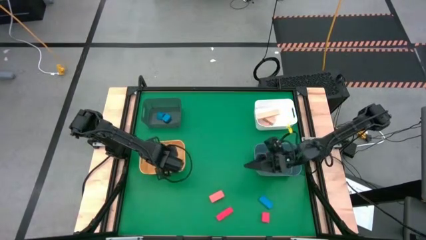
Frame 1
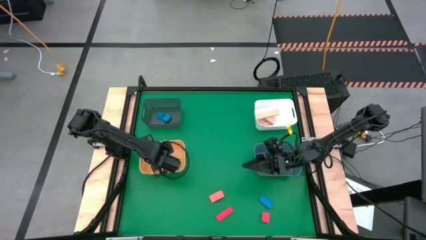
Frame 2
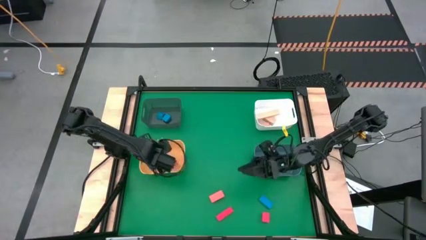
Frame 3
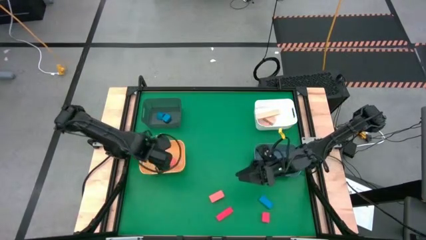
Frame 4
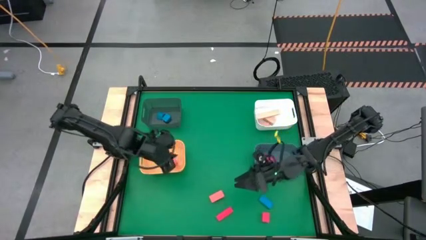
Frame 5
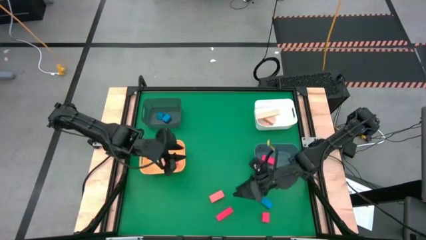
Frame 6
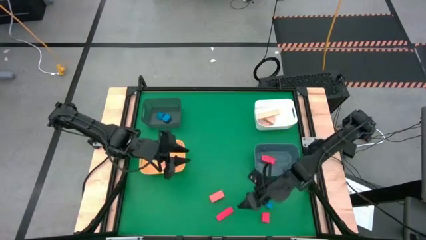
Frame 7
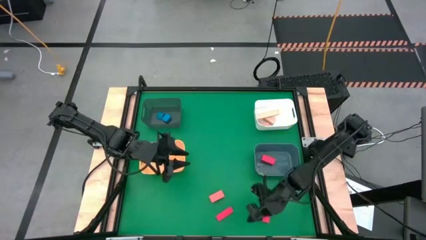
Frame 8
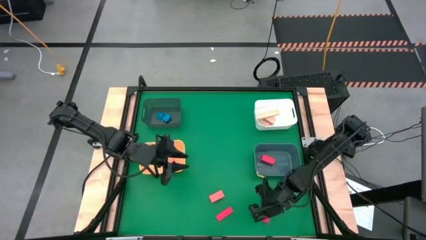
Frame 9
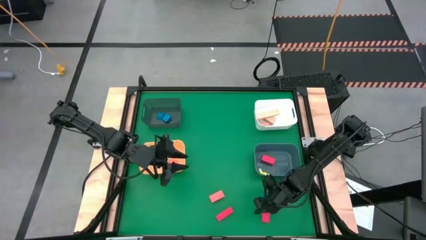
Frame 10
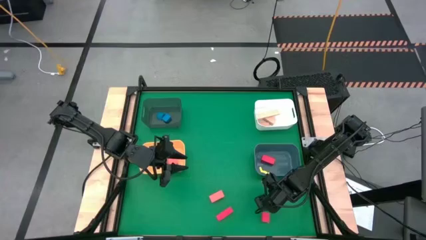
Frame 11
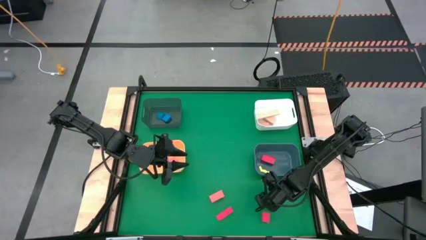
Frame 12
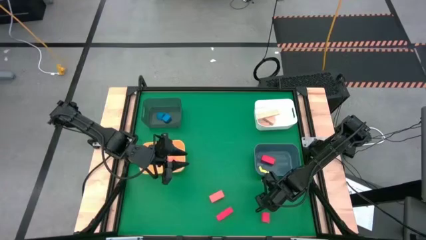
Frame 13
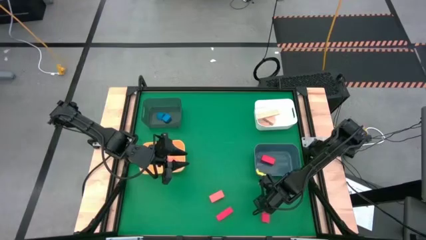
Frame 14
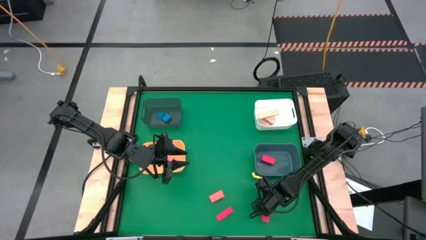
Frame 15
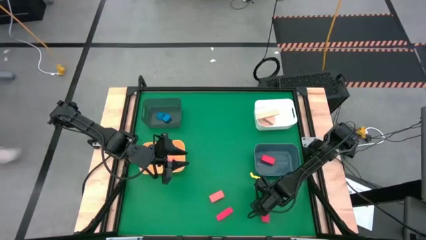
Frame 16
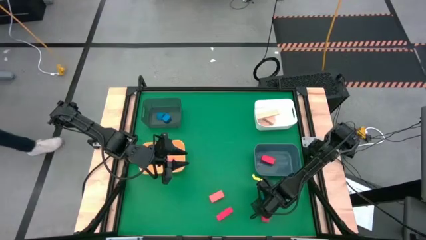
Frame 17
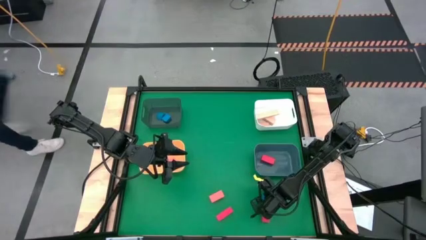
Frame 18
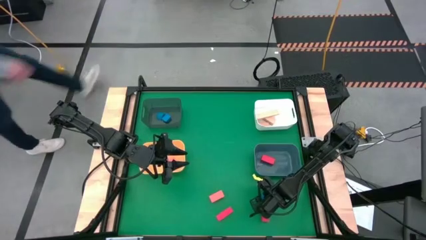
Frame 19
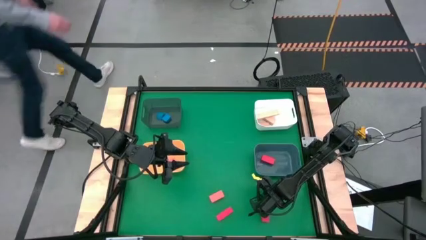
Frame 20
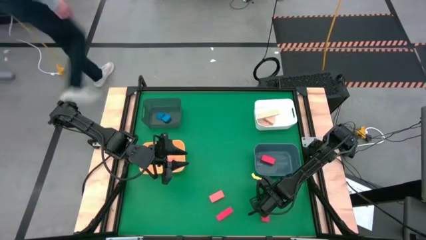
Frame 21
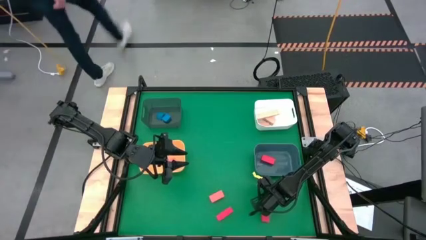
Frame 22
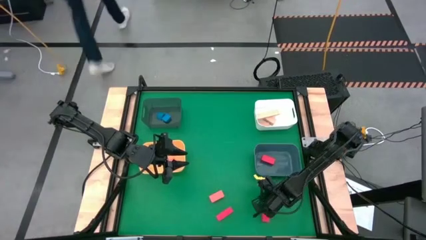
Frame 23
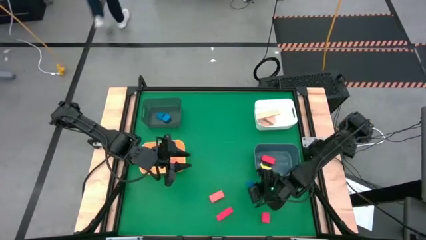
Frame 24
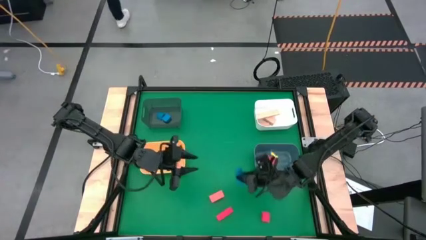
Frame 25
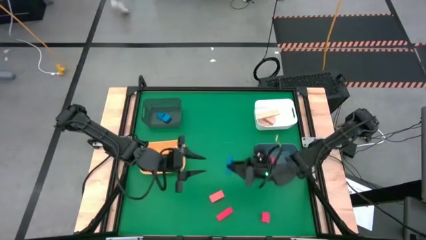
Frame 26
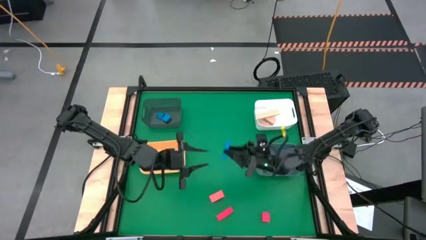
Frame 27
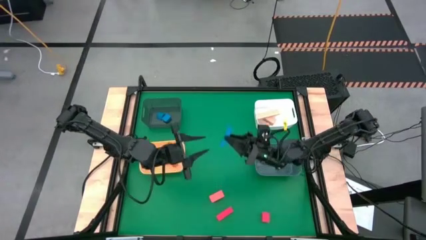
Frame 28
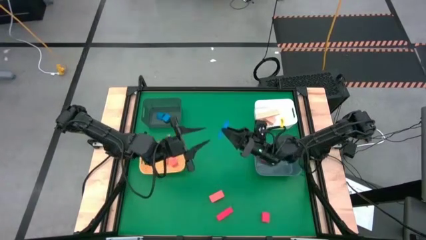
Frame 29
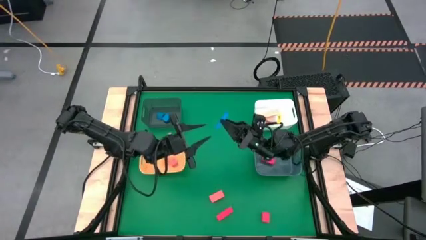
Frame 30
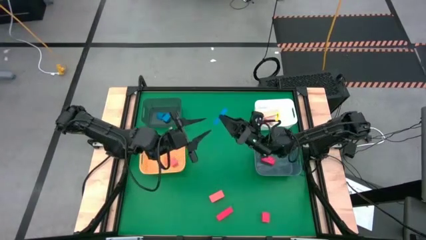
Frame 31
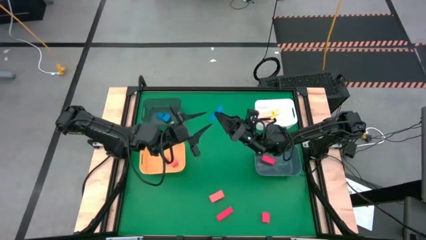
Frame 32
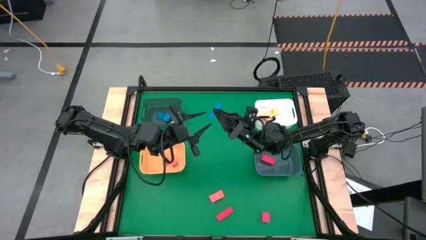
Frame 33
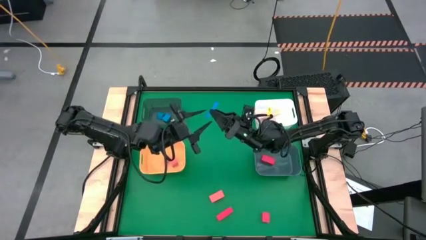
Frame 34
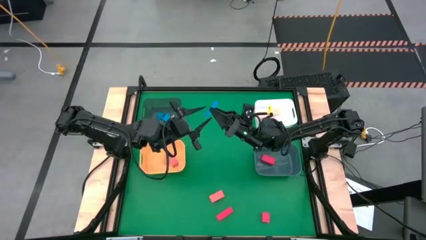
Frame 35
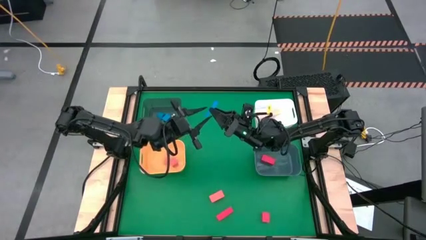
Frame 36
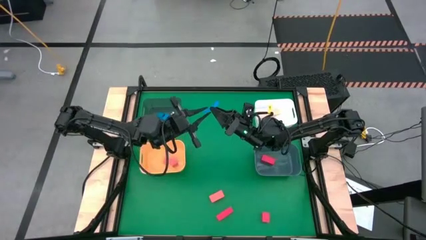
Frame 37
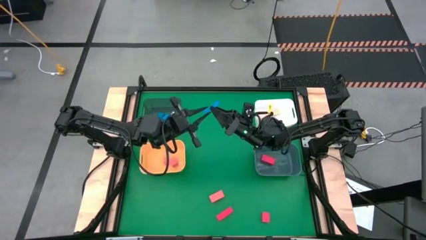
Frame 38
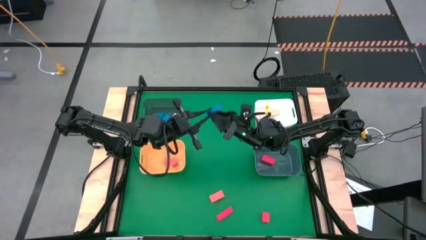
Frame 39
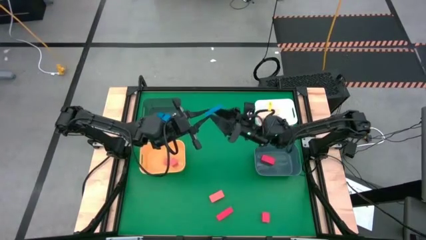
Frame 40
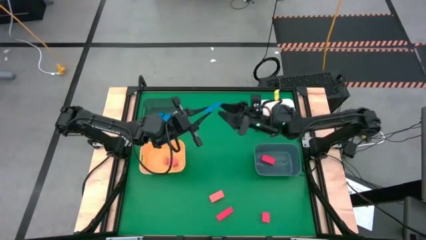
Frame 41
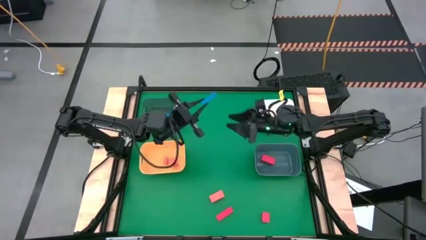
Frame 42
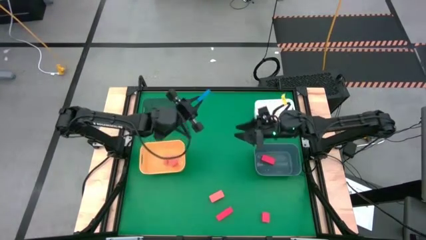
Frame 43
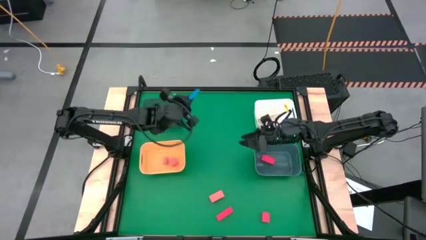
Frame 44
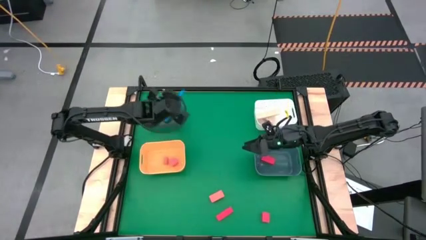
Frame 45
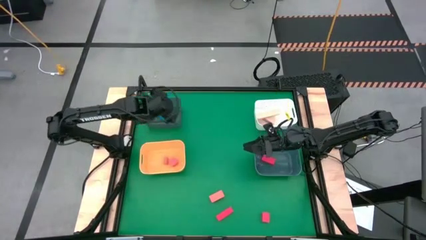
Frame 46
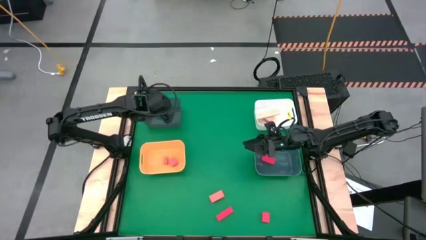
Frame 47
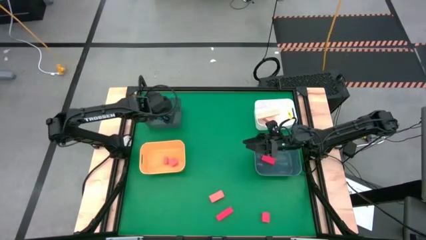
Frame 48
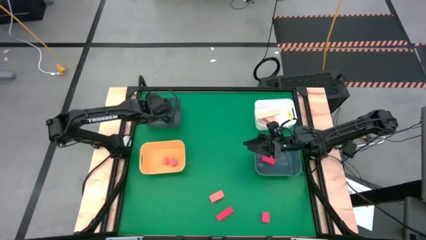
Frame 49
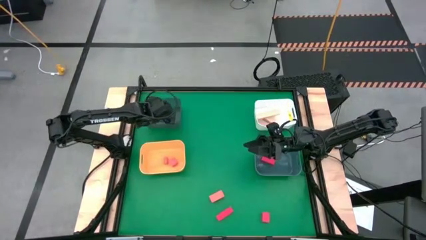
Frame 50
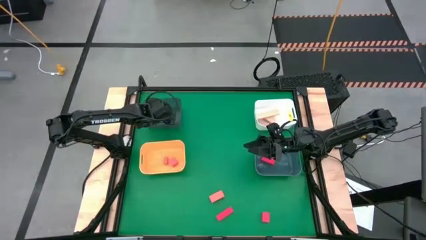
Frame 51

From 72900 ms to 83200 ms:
Task: Sort & place blocks by color
Put the blue block into the black bin

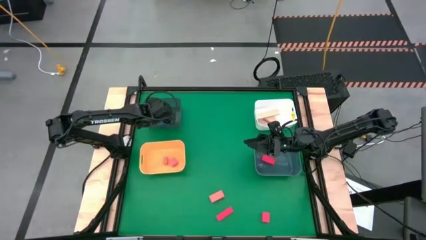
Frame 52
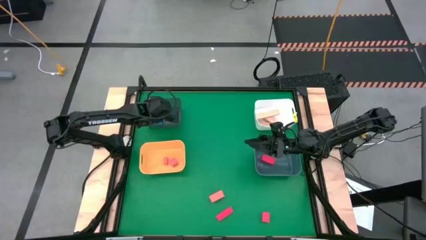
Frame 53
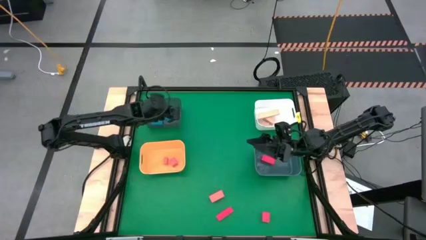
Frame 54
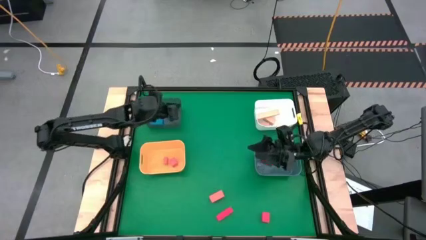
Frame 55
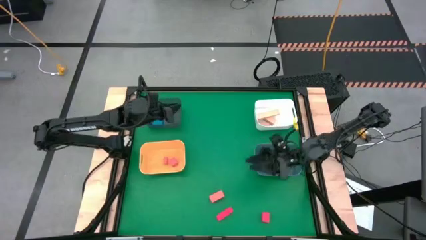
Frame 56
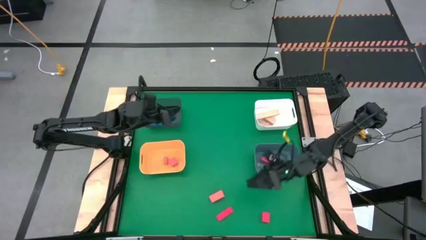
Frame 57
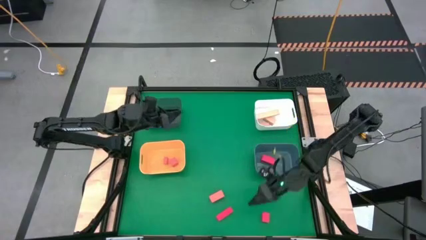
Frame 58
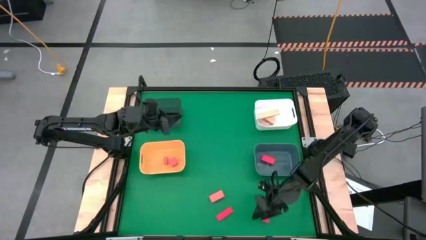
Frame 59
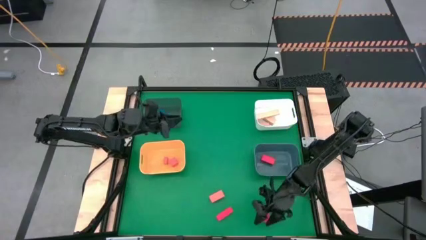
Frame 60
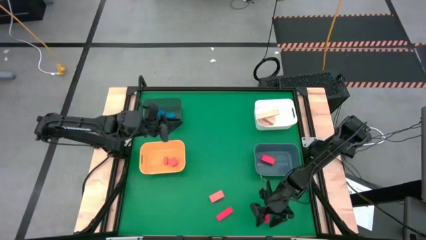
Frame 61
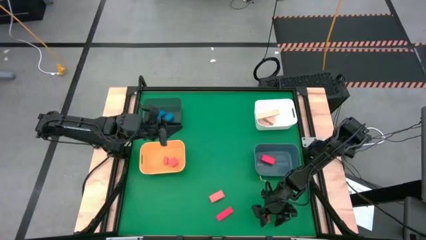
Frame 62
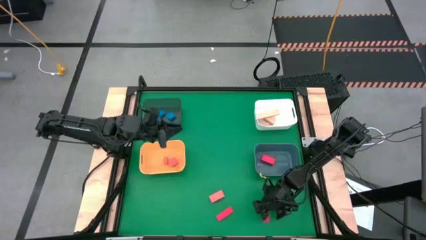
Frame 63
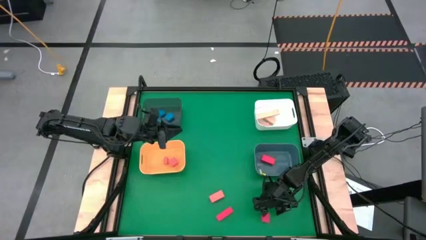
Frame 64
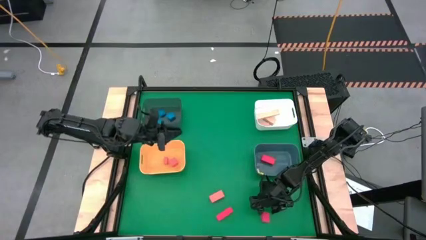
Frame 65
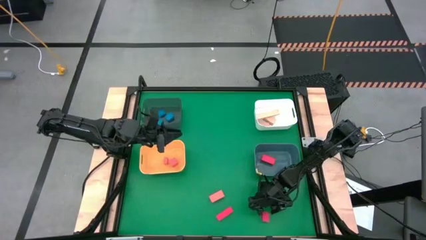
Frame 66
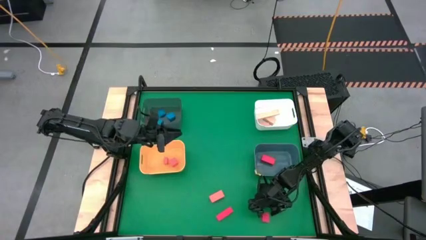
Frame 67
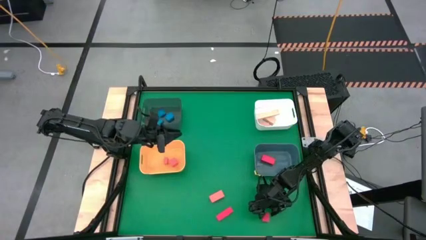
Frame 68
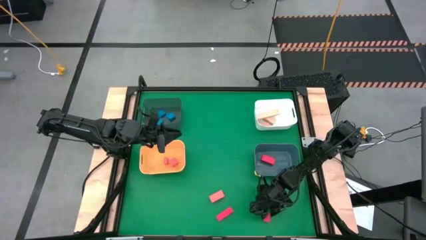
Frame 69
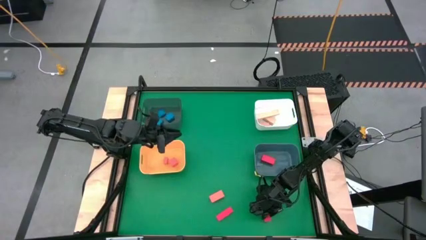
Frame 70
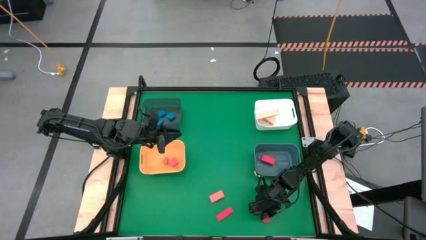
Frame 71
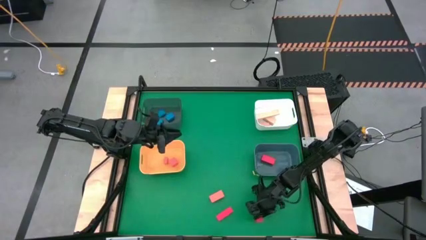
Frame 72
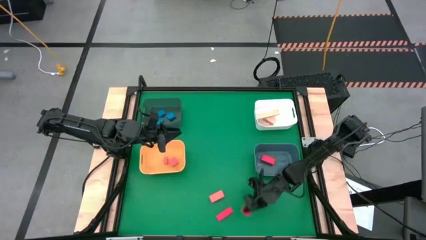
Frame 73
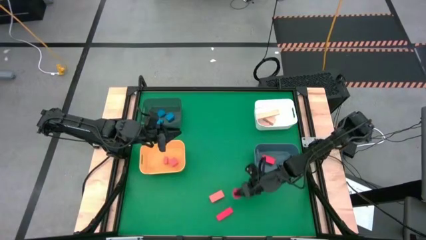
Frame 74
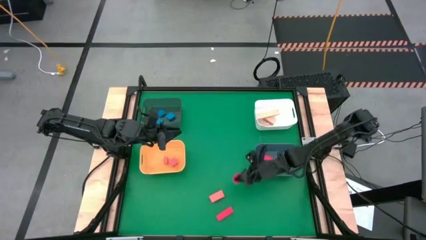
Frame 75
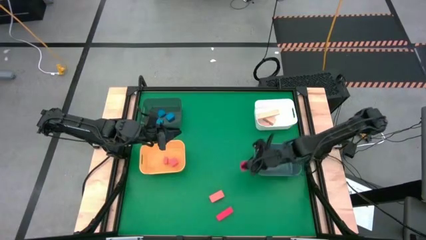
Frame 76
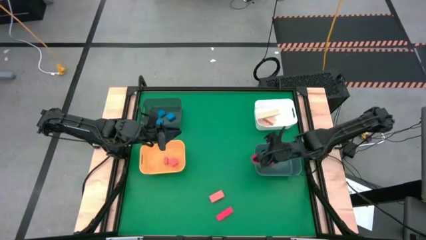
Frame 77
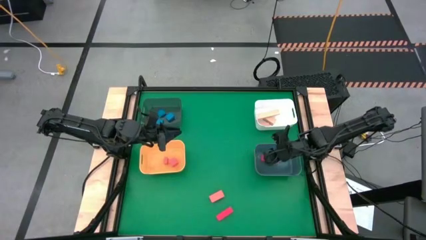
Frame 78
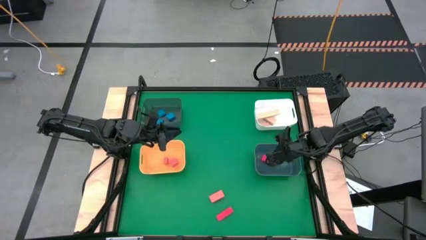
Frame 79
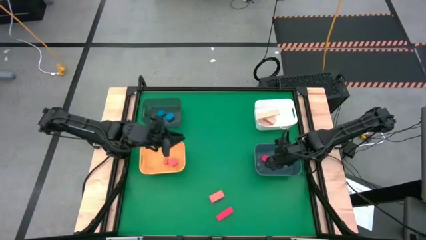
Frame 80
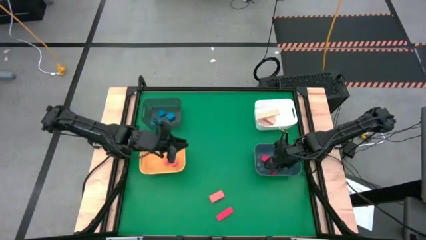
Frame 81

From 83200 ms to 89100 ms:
Put the right red block into the green bin

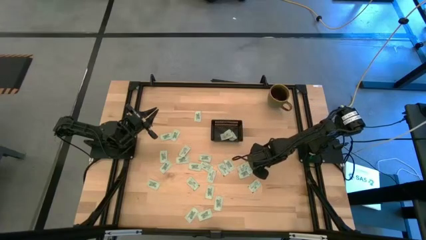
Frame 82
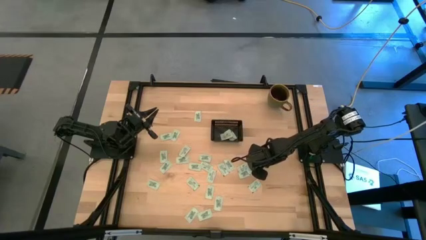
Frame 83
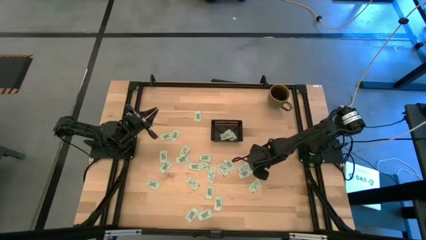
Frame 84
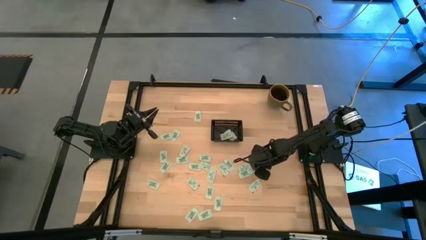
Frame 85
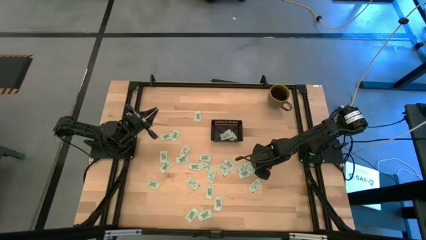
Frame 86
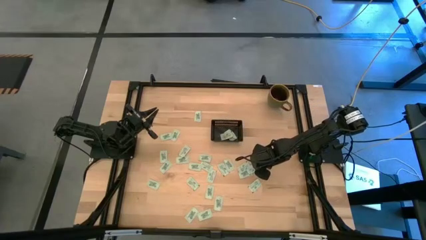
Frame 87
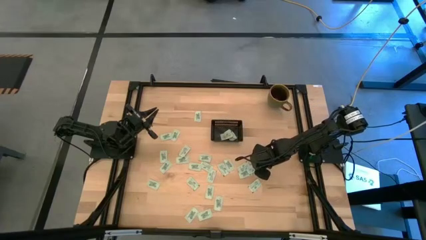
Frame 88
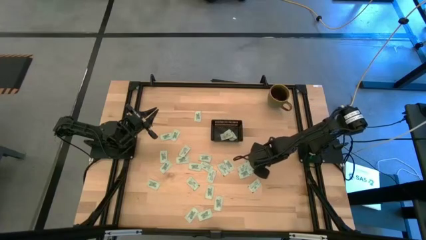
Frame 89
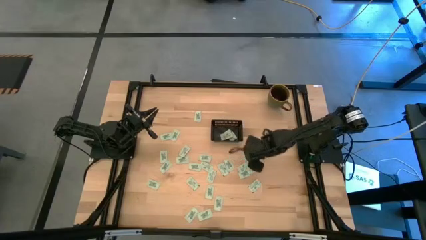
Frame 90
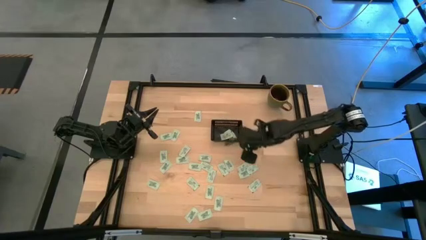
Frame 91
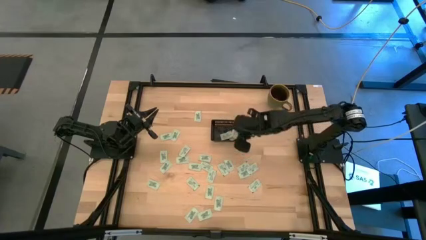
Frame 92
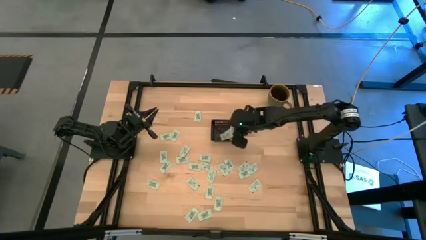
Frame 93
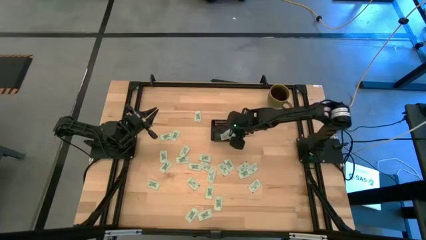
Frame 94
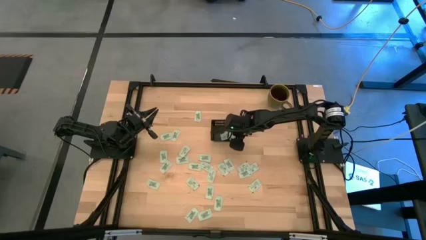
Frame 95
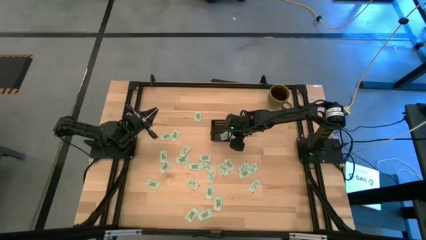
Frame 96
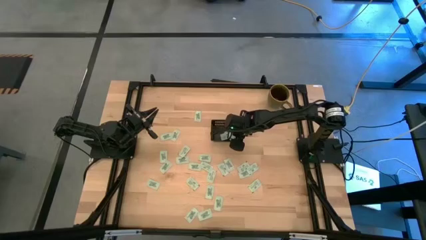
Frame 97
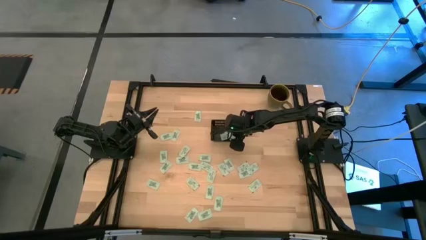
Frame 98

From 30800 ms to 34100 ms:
Task: Pick and place Stevia / Truvia into bins
Put the stevia packet into the black basket
